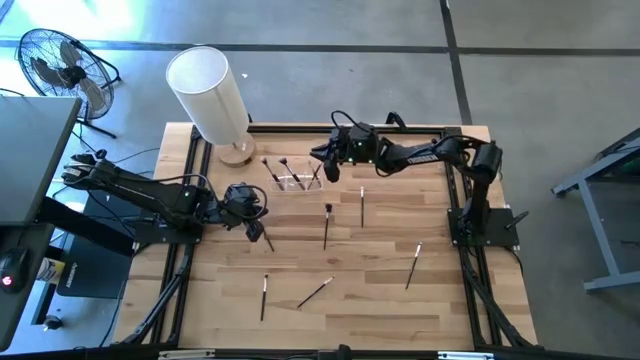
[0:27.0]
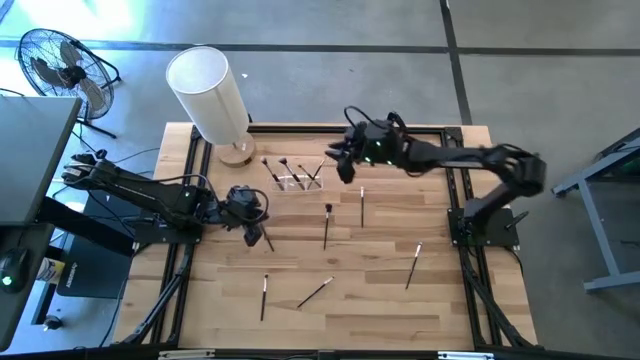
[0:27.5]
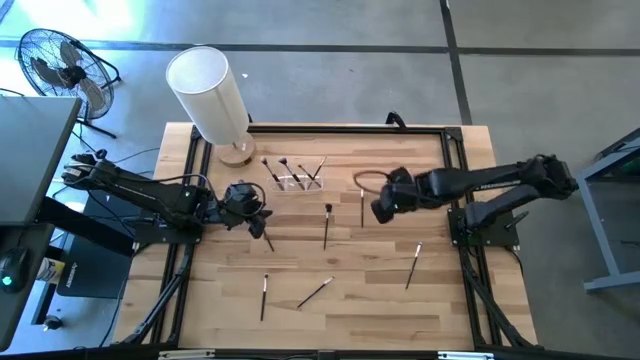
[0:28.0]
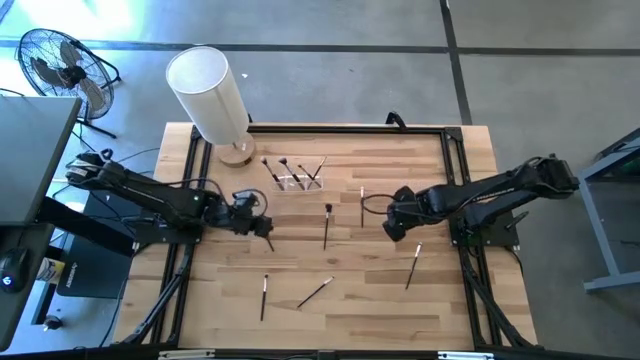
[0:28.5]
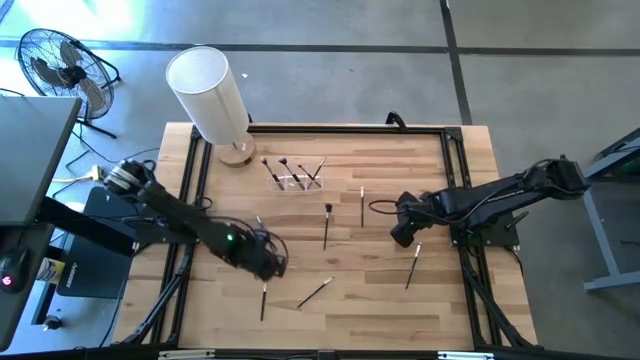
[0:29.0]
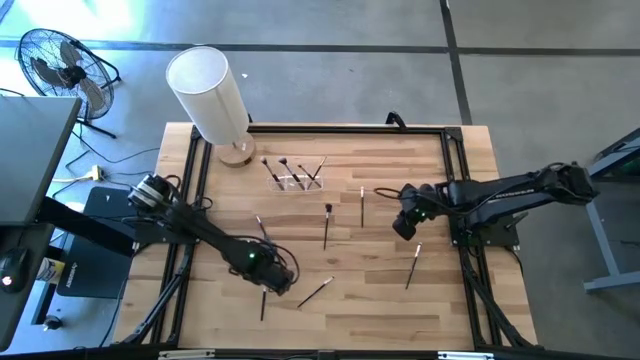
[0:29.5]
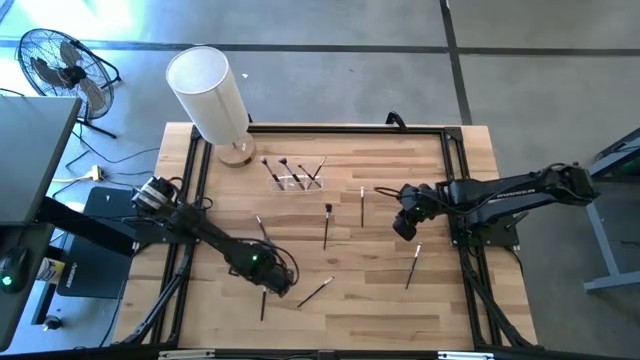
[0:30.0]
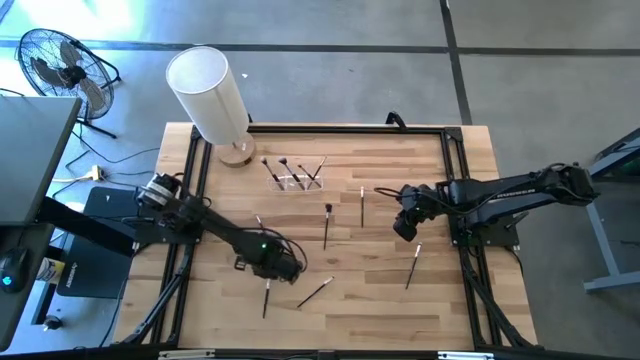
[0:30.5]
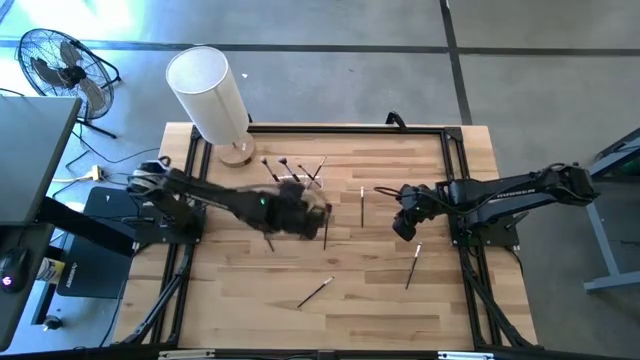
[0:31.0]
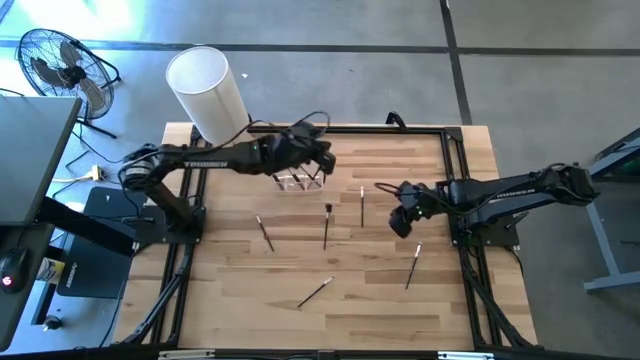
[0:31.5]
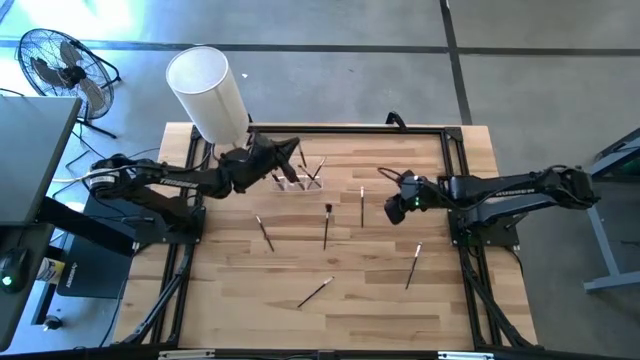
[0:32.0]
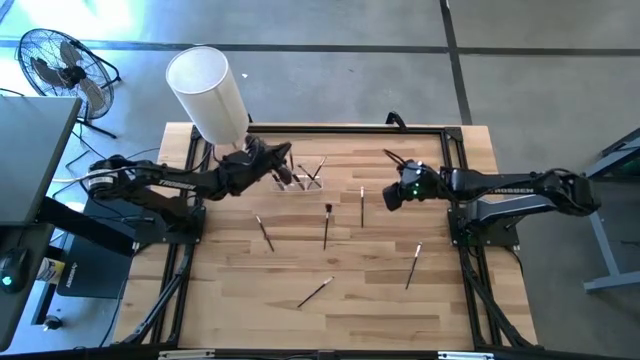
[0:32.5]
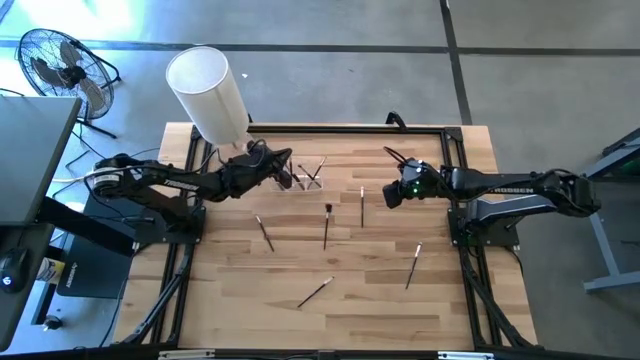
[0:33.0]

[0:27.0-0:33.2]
Task: Pick & Place Makeup Supplies
Put the black makeup brush into the transparent organizer

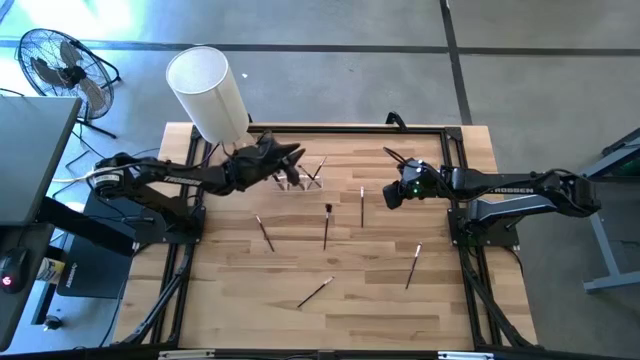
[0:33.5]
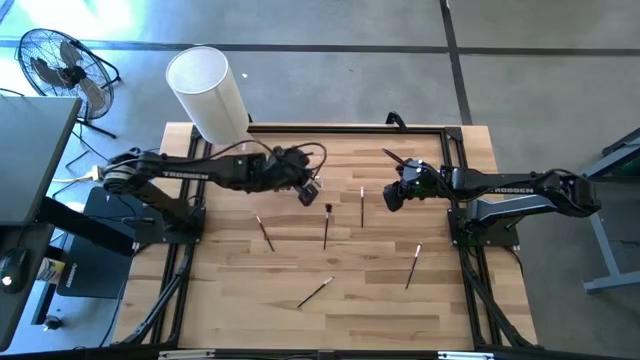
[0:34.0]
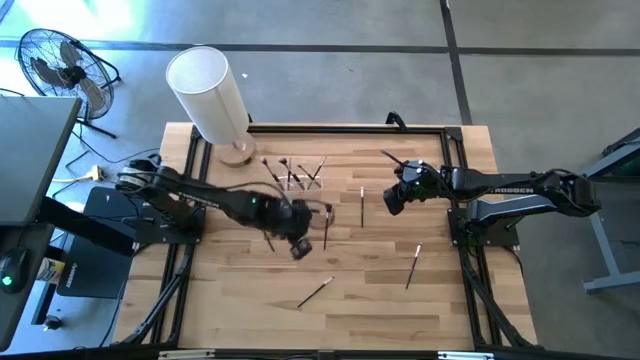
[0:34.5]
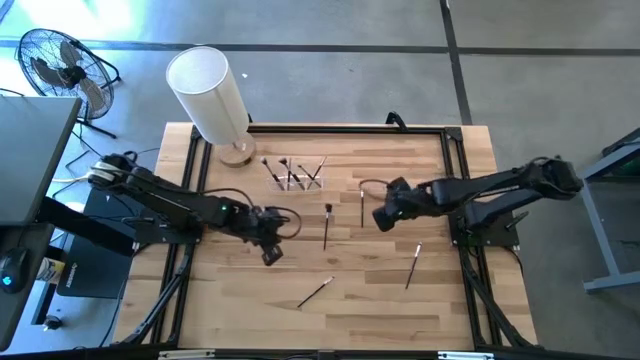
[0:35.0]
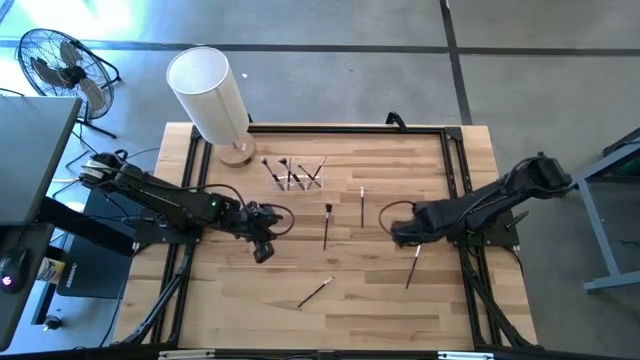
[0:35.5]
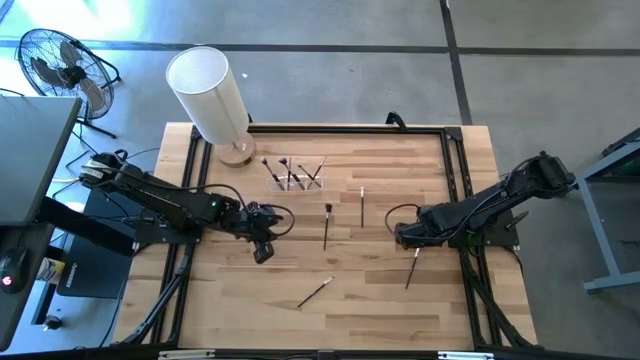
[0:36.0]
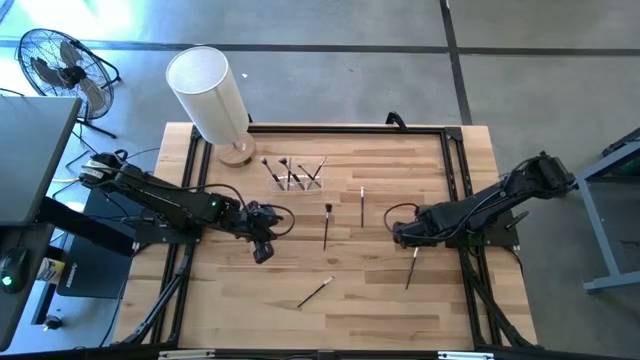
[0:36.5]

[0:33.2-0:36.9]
Put the black makeup brush into the transparent organizer

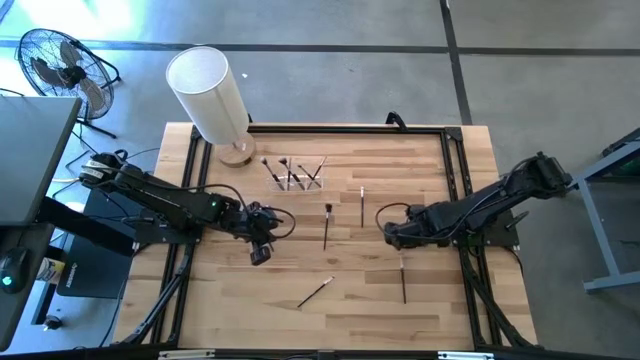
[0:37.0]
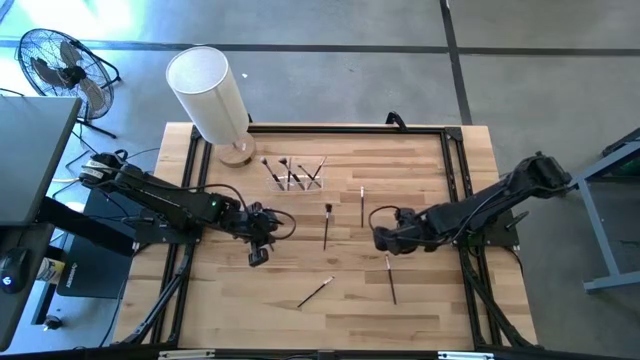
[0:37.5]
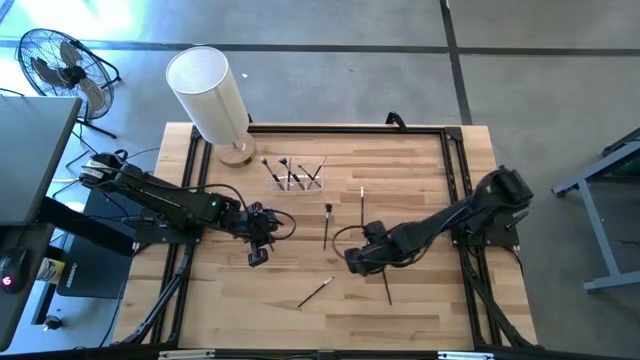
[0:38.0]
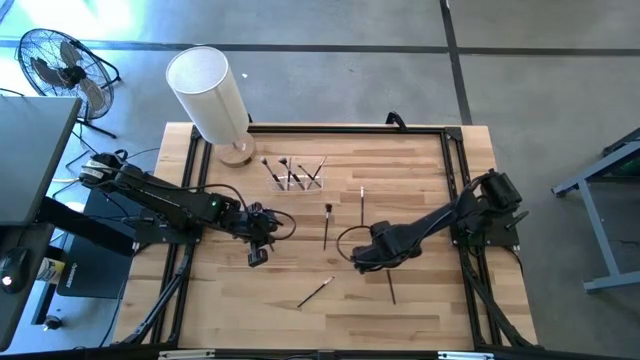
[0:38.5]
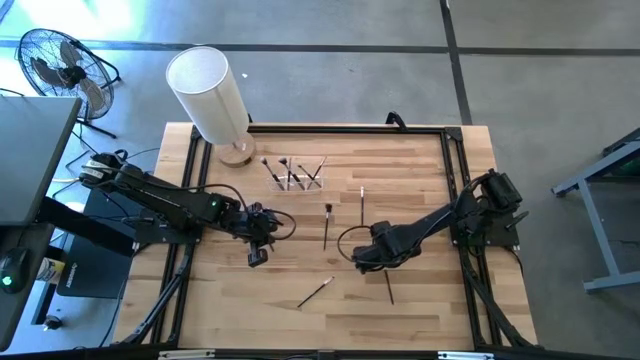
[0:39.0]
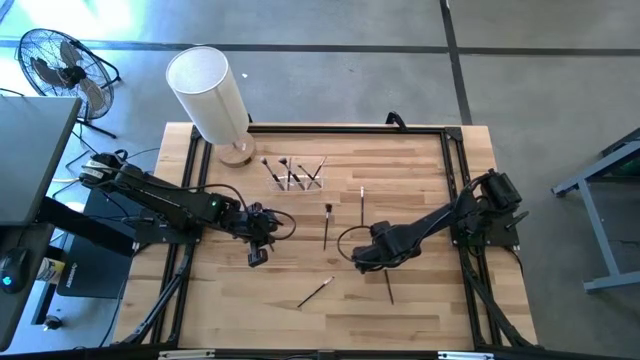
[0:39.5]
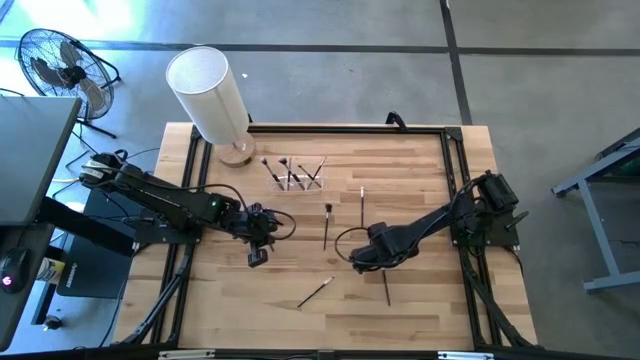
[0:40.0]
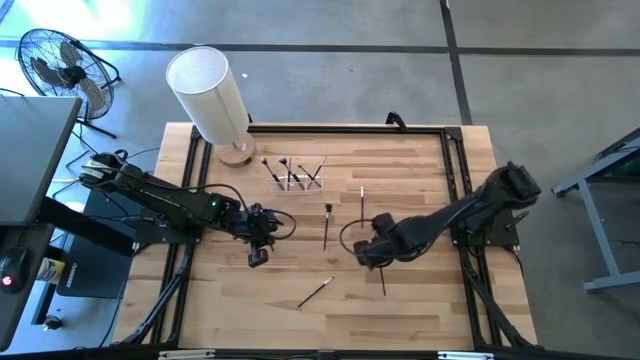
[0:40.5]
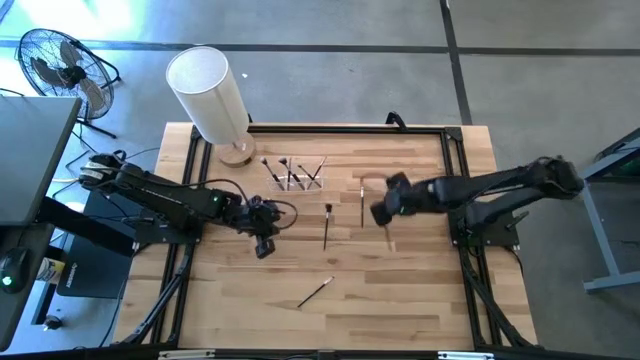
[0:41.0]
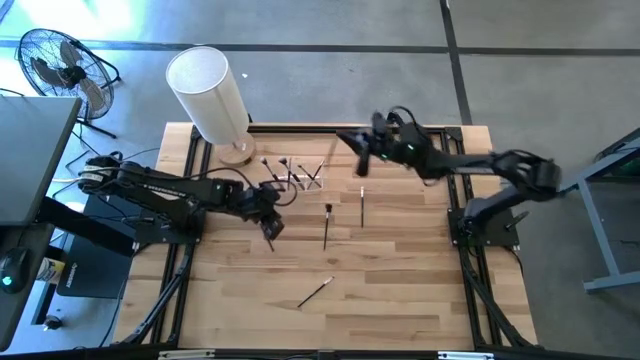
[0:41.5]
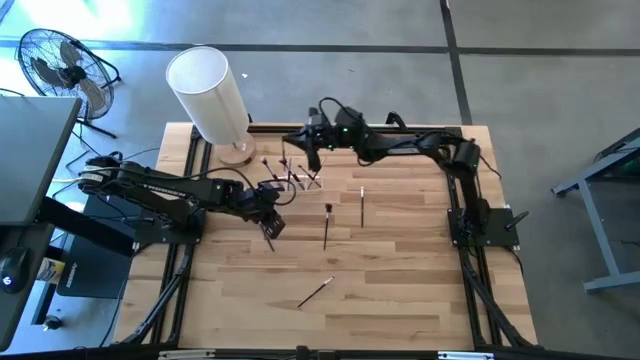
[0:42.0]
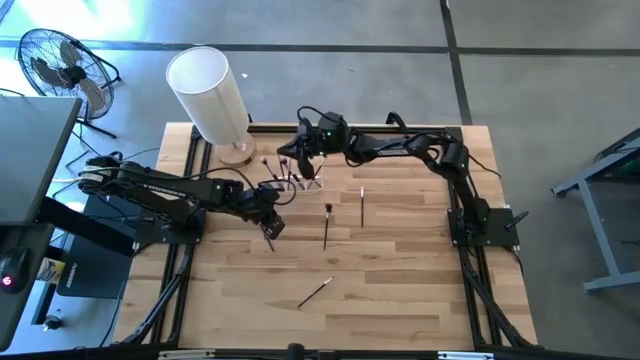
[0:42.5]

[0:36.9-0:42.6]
Put the black makeup brush into the transparent organizer

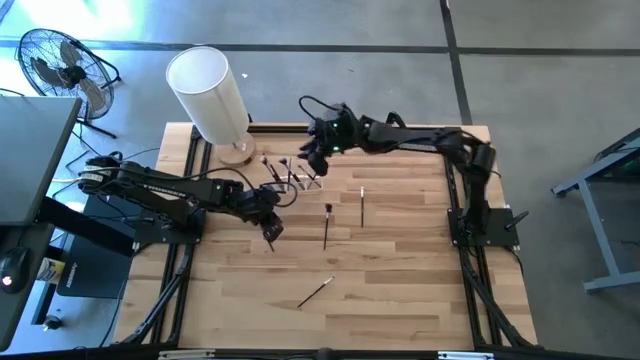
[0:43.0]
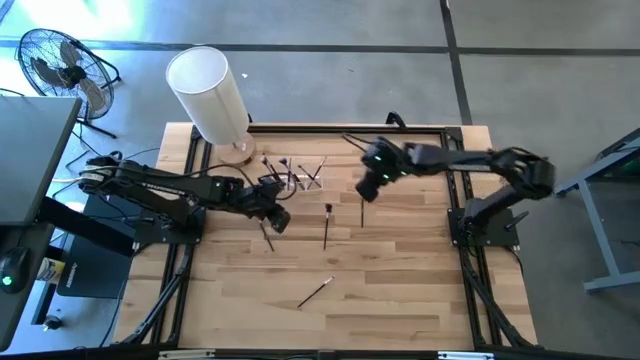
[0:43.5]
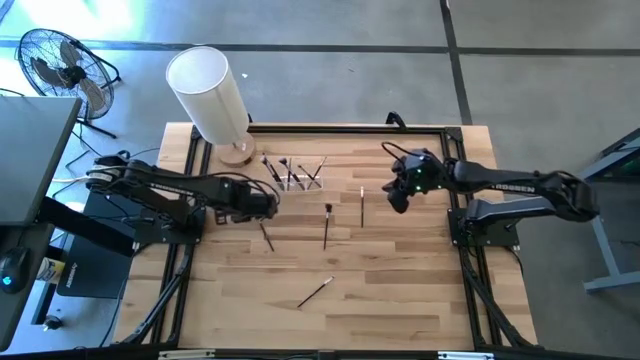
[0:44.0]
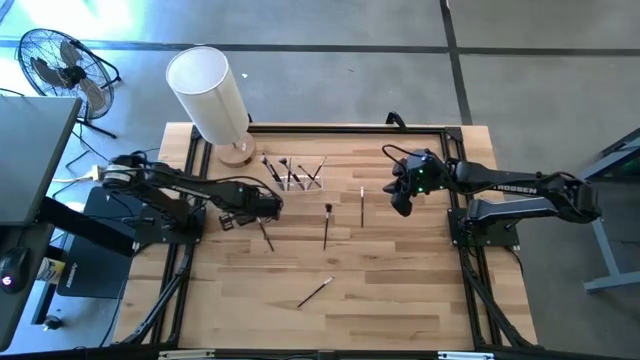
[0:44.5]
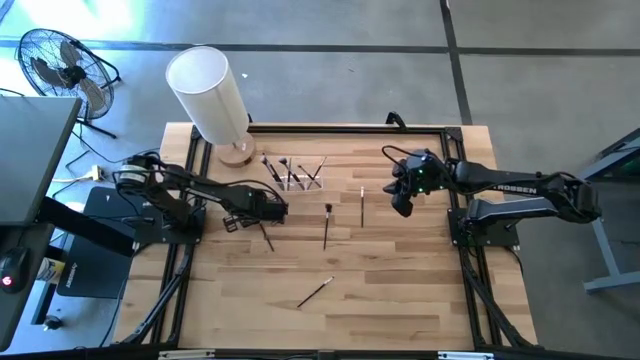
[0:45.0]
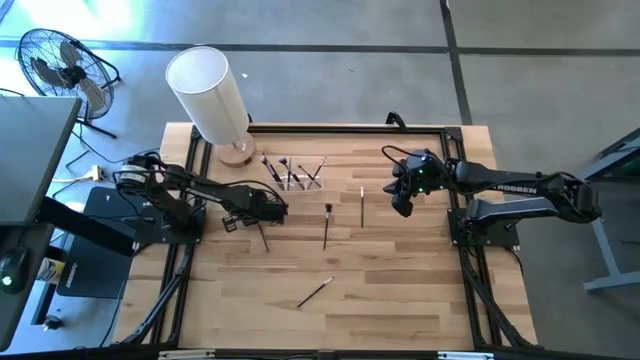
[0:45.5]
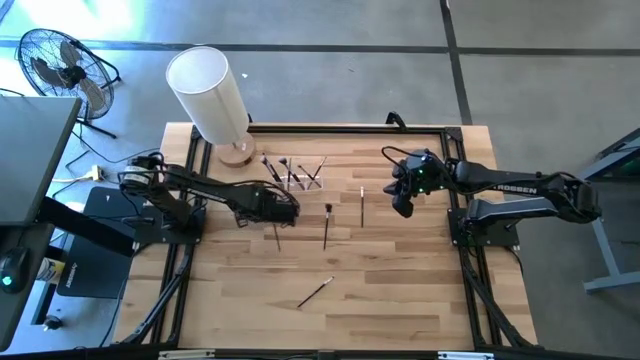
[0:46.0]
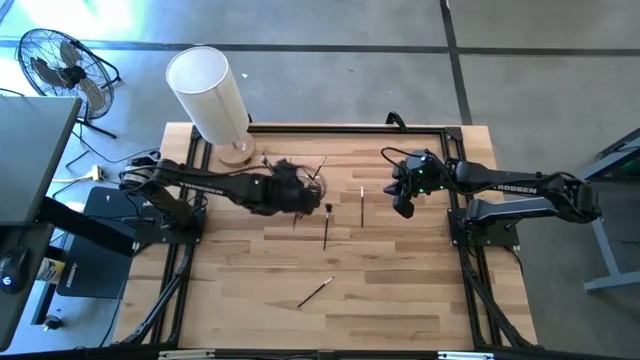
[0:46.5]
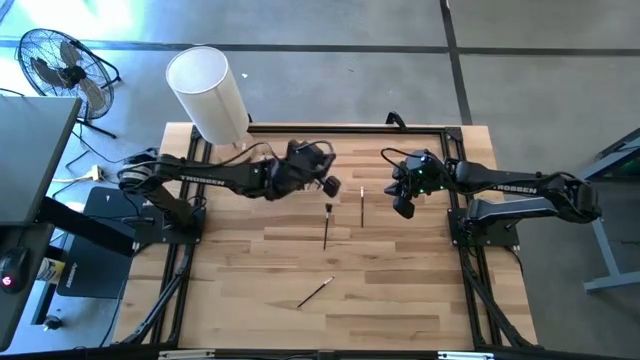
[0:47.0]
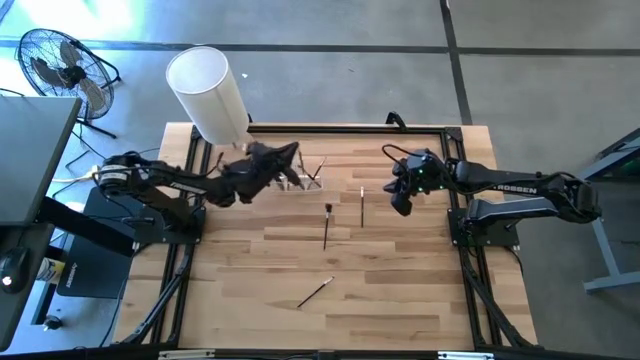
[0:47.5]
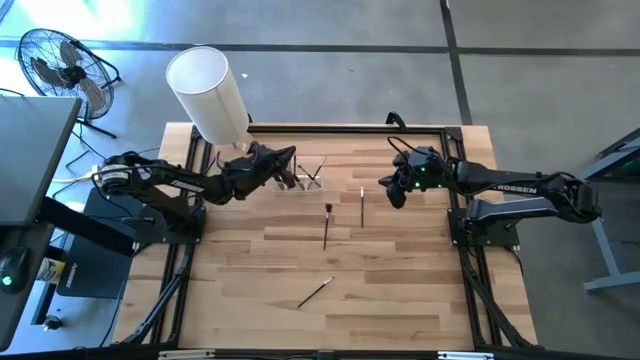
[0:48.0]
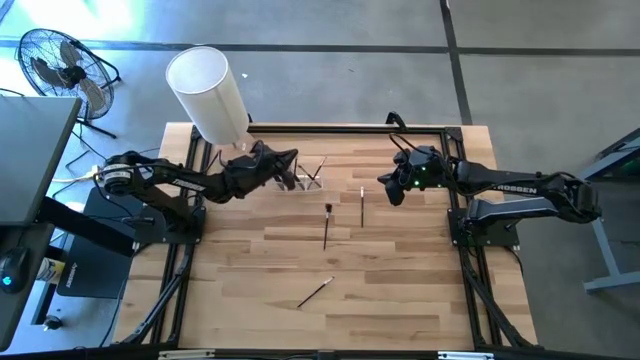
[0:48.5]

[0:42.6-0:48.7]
Put the black makeup brush into the transparent organizer
